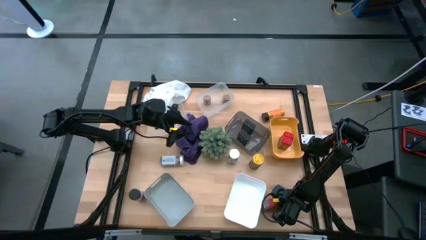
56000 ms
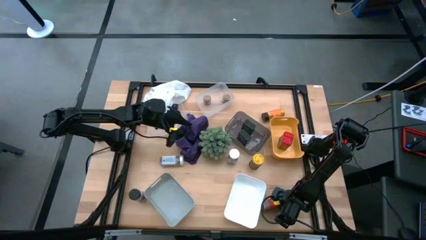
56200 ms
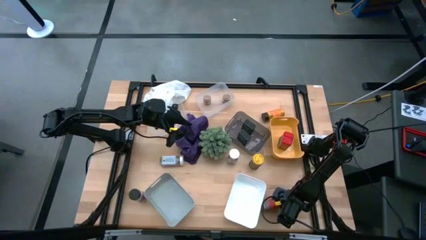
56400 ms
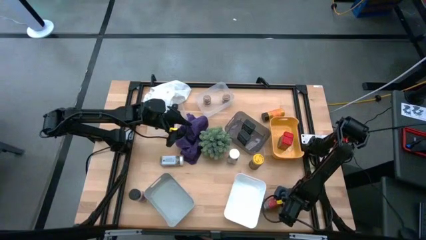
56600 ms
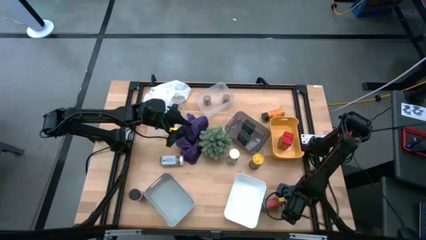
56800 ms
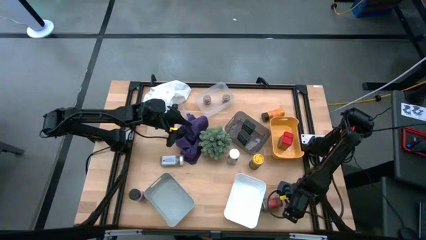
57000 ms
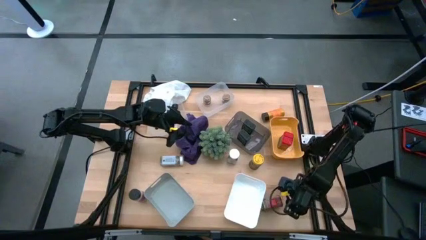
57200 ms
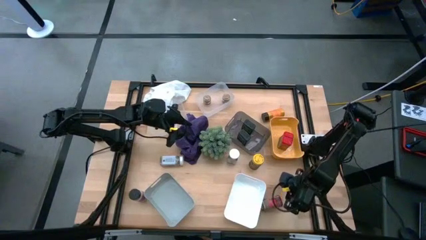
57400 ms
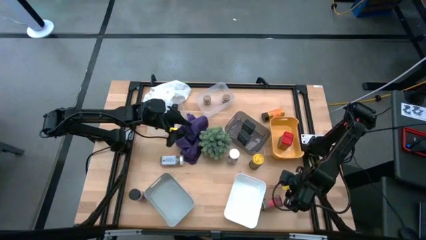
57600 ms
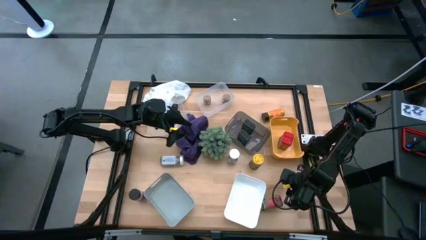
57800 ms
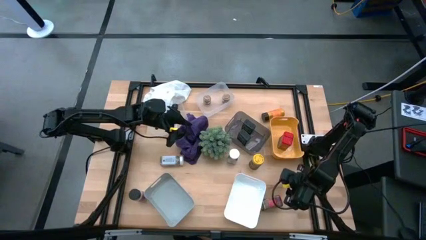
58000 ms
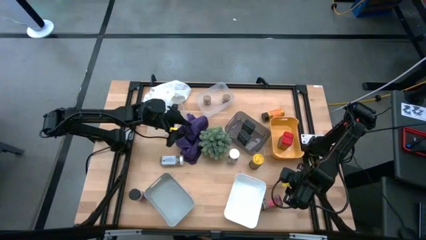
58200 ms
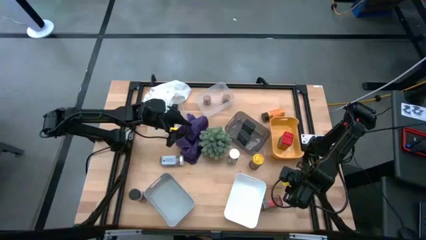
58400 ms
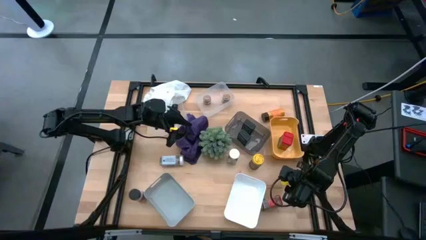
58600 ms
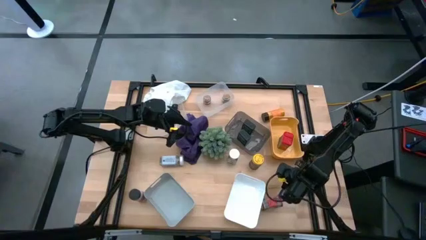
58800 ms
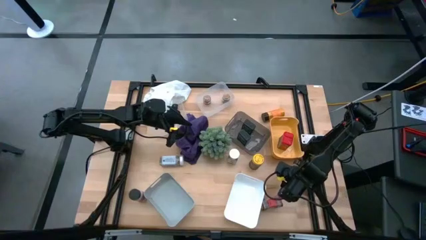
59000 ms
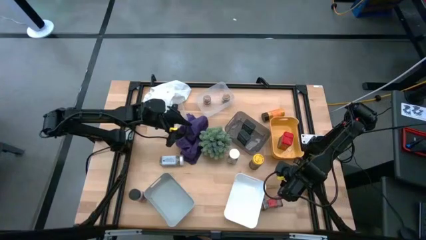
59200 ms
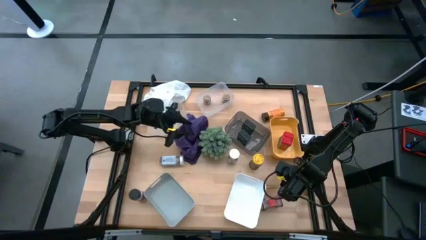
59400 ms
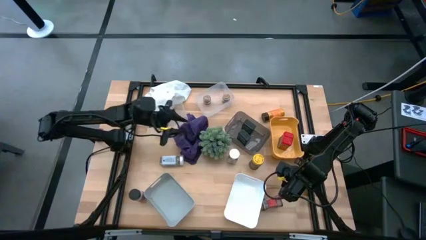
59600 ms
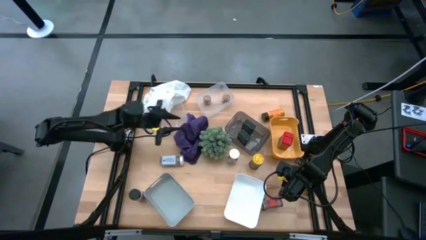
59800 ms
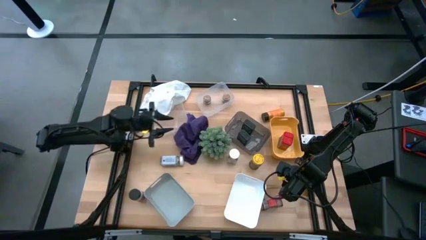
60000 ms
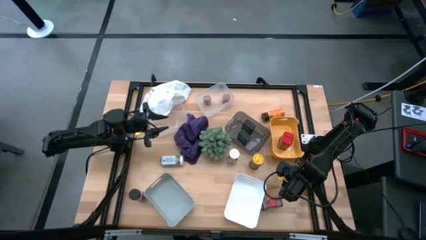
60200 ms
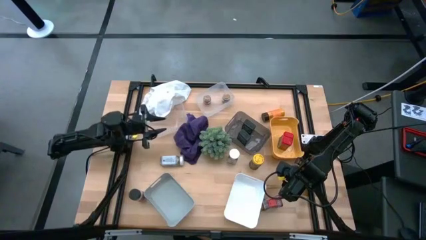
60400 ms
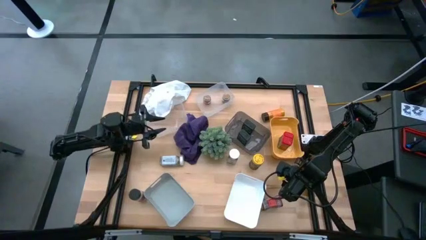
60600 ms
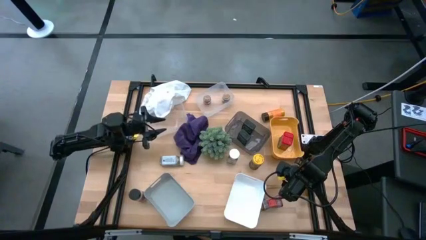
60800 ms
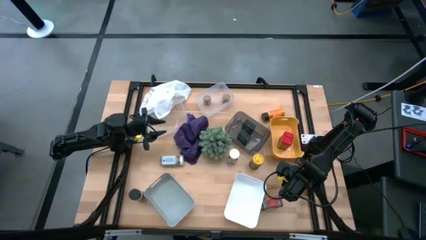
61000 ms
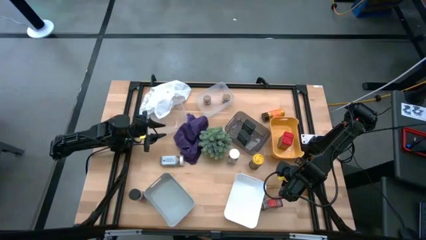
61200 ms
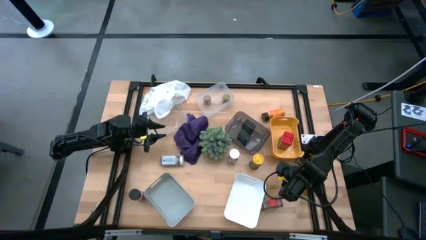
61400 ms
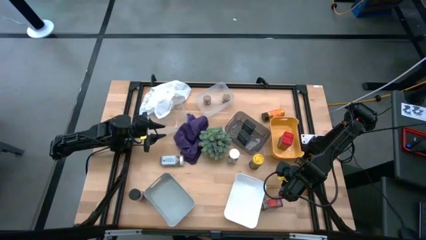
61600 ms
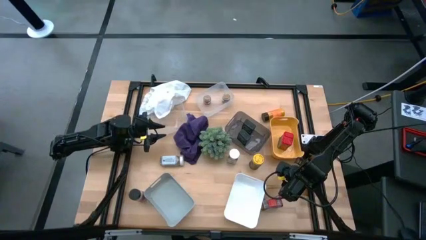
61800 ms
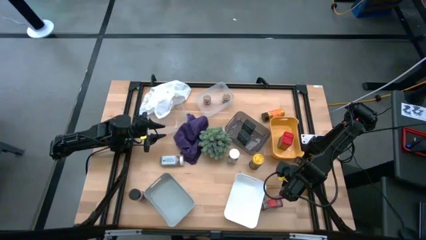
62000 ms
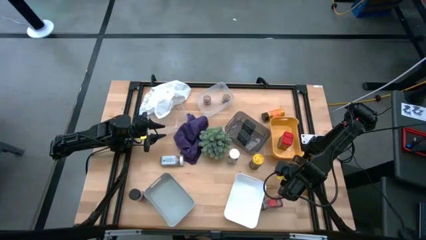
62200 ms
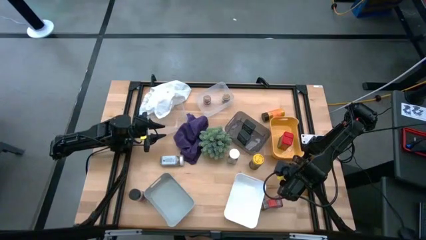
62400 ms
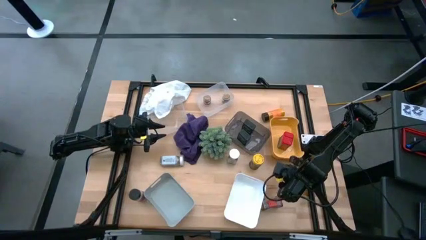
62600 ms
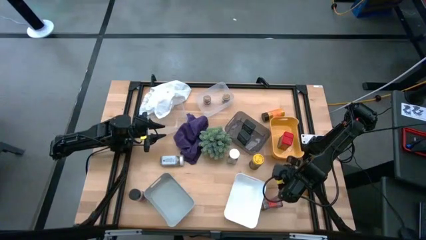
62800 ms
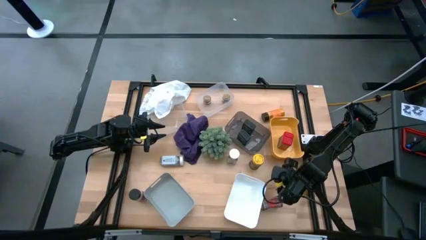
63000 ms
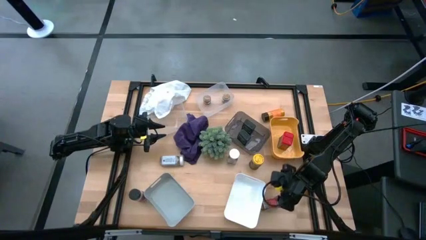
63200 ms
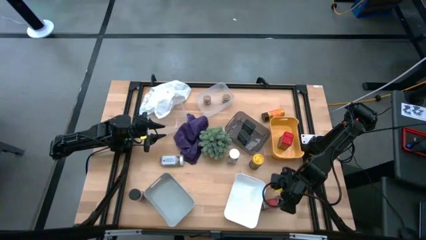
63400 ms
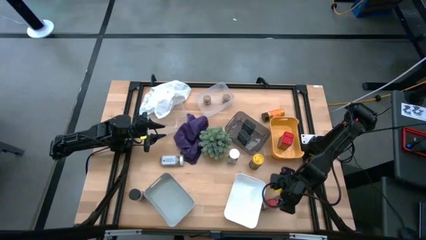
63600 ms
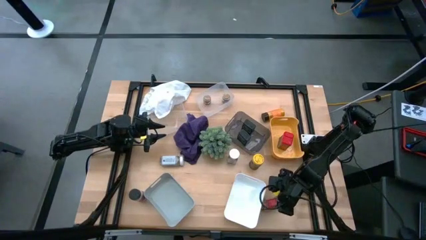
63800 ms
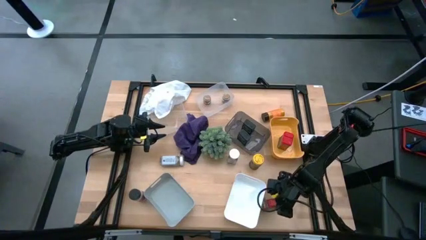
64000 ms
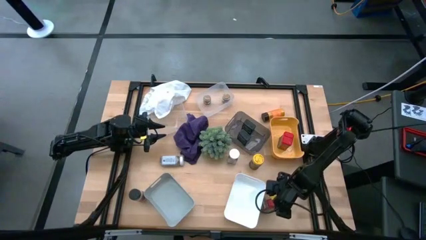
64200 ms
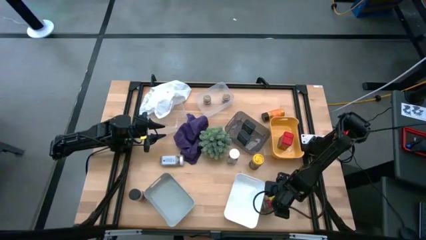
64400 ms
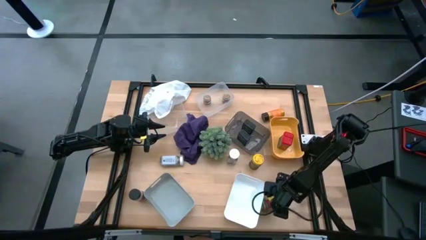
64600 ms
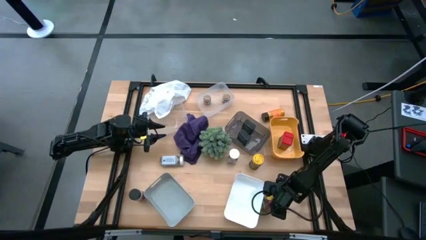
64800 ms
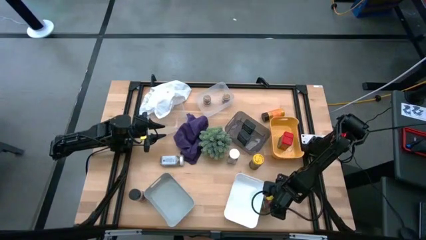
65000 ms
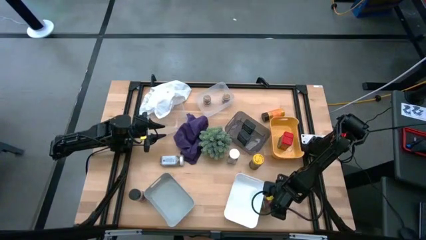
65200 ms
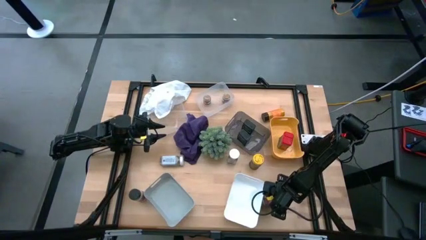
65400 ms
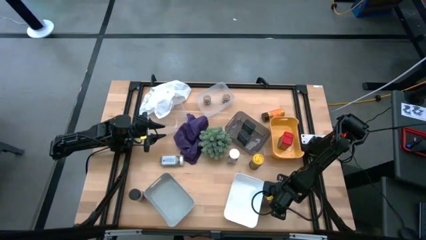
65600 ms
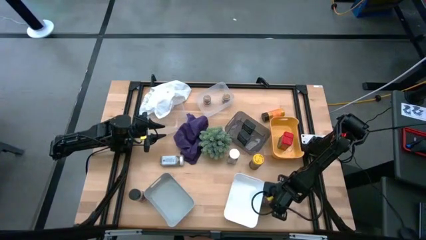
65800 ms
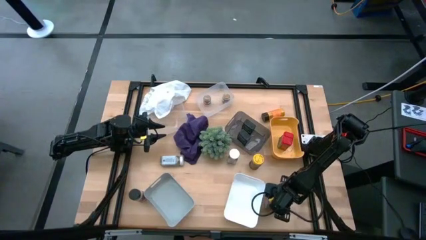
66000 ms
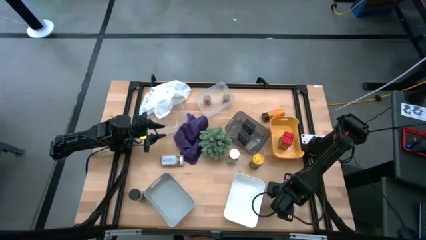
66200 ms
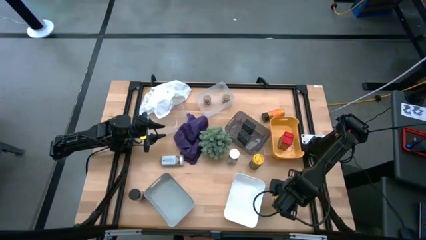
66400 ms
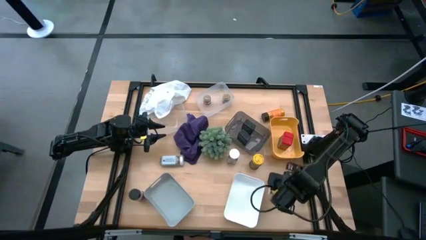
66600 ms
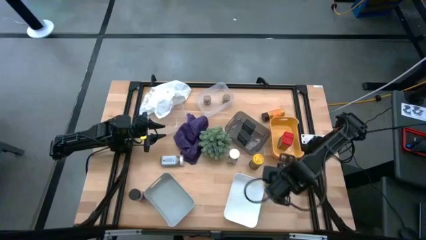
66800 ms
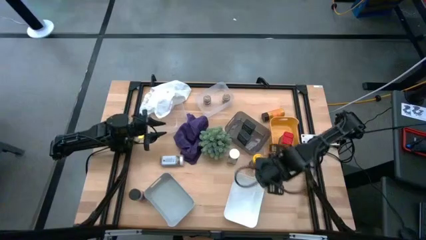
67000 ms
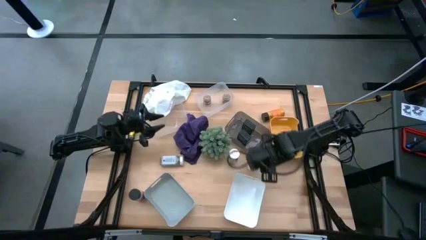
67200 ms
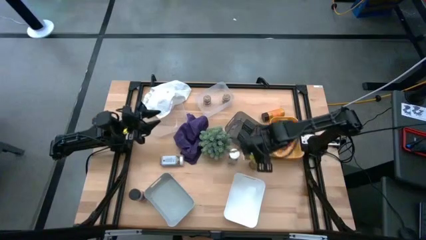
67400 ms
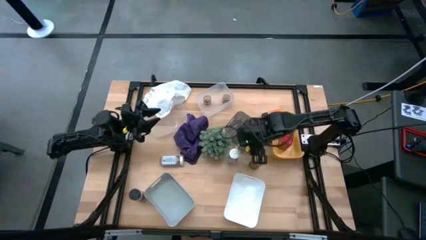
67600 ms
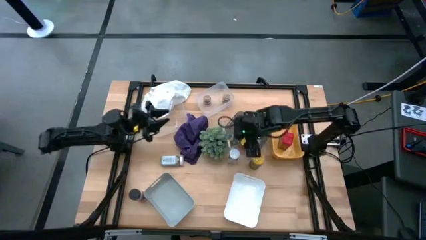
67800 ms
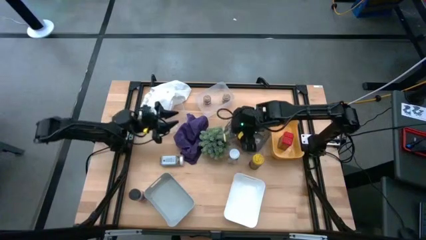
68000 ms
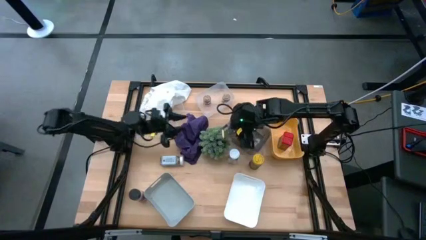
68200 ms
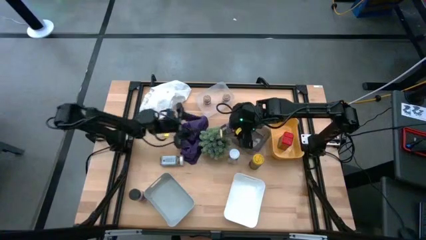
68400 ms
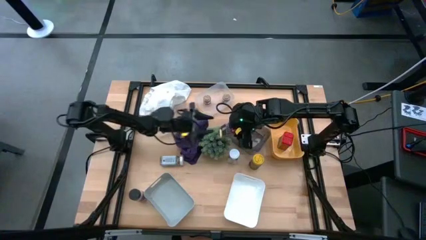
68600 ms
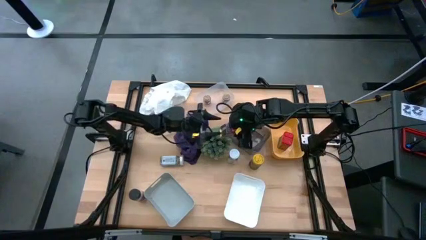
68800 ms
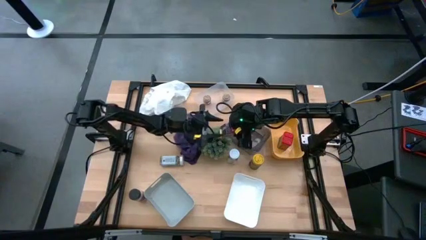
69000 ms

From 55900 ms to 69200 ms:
Task: Sort spices by type
Put the red seasoning can into the orange bin

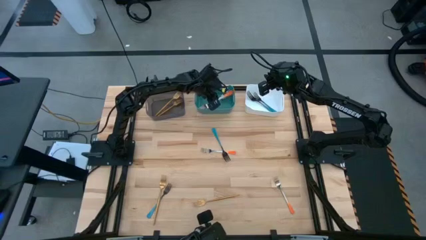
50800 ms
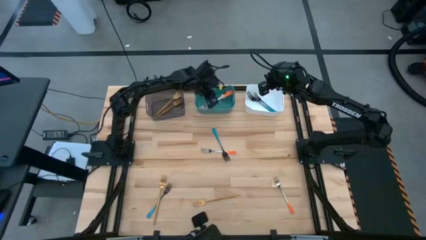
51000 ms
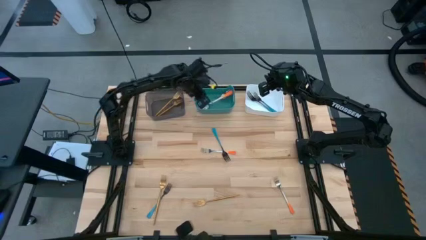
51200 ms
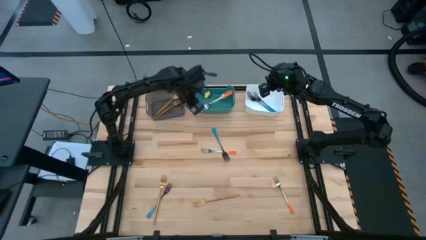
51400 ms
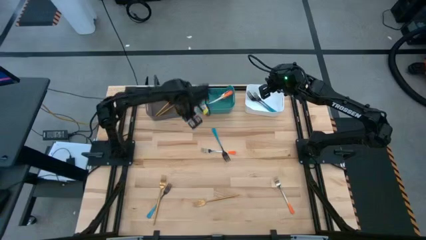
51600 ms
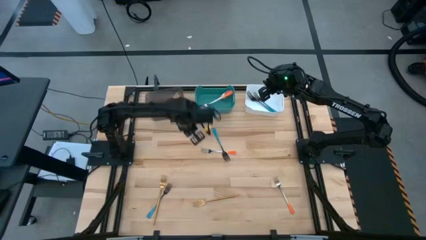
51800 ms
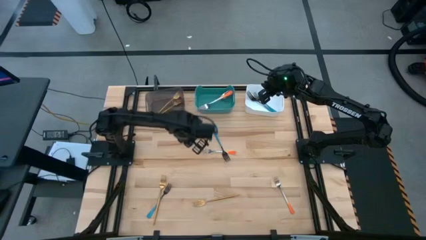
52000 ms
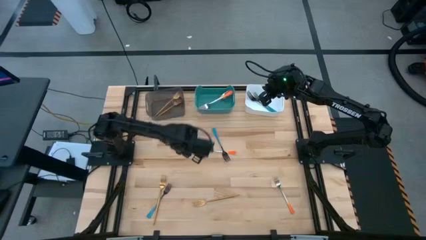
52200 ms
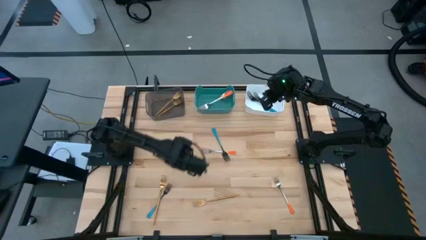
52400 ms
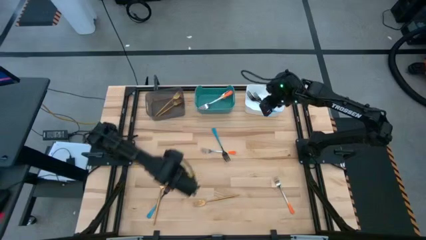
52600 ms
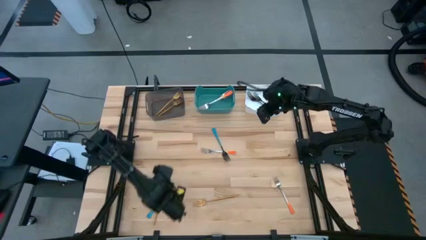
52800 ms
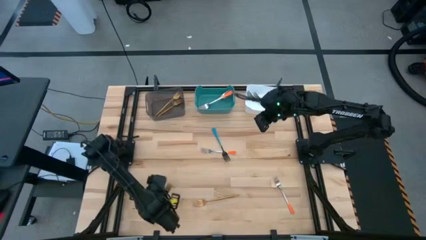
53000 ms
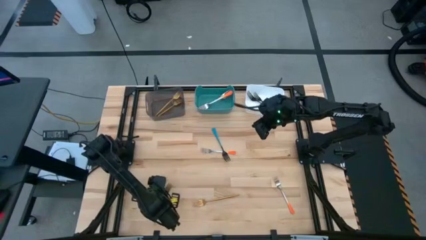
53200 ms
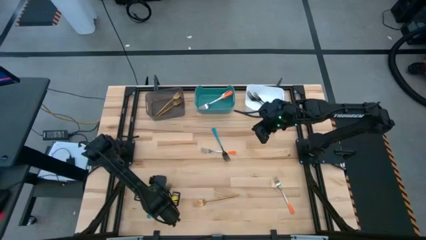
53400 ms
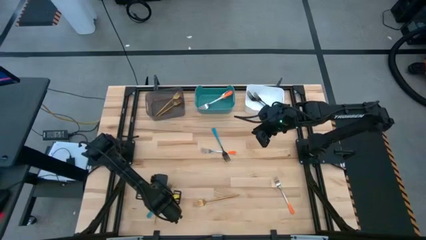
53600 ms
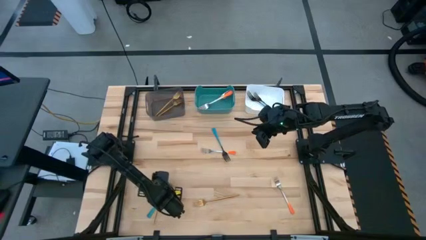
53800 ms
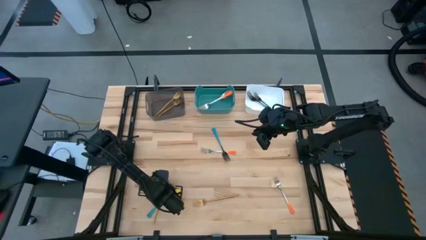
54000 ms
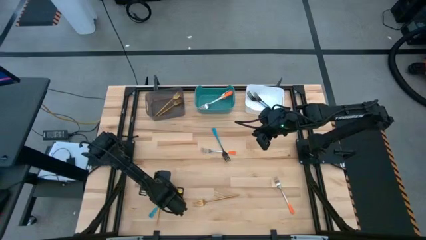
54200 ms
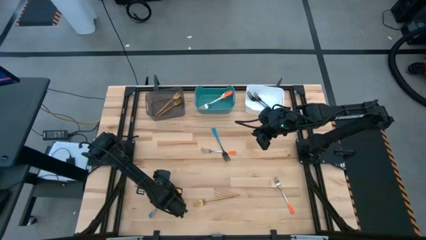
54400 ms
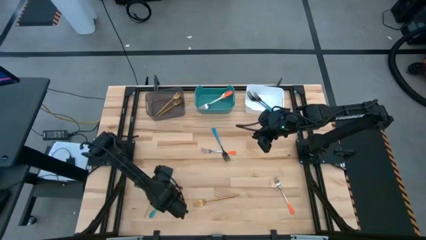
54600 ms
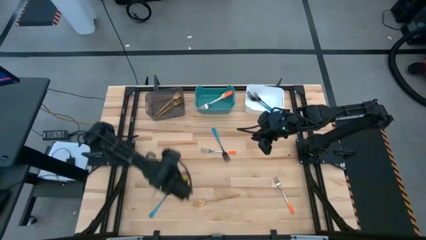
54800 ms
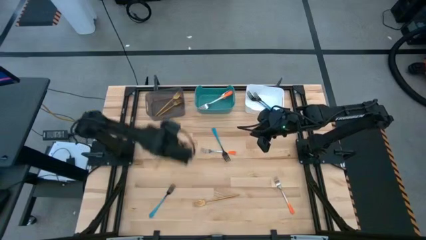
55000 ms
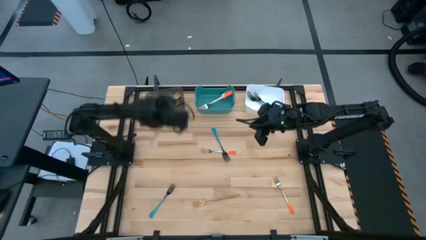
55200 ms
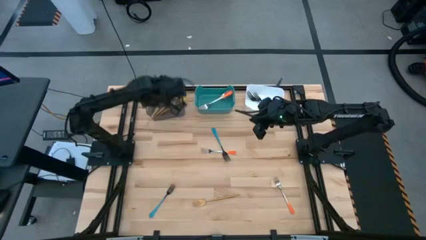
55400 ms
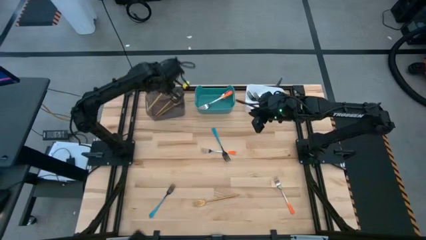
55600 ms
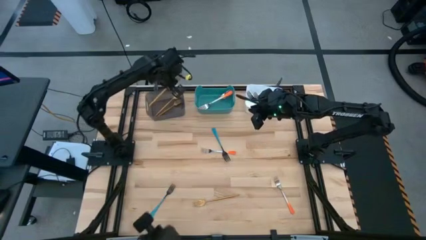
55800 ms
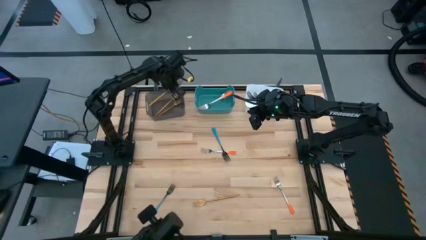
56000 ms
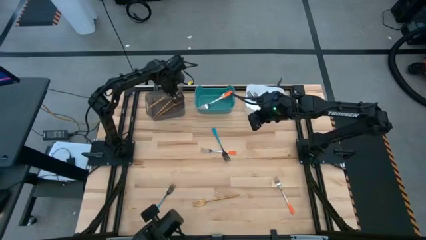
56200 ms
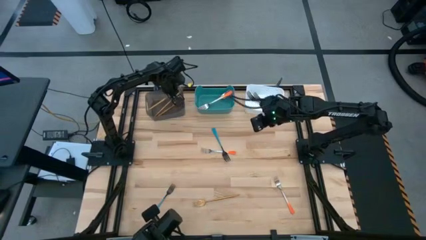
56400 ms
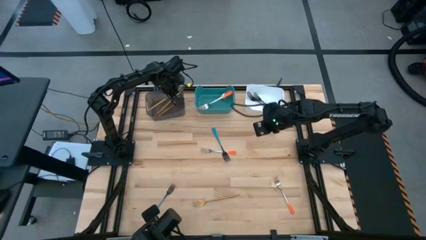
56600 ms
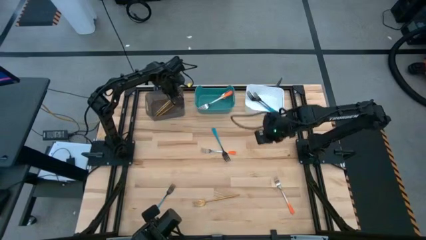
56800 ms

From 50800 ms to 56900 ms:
Task: Sort silverware by color (type)
Put the gold fork into the black bin
